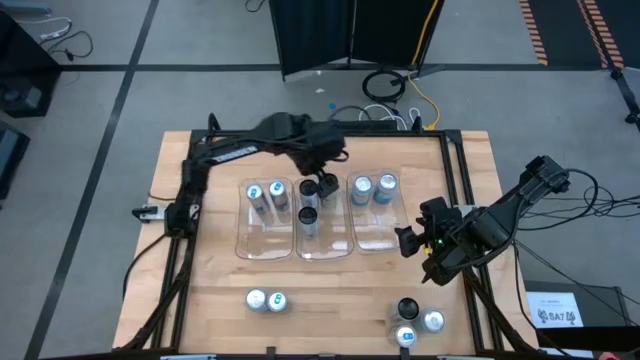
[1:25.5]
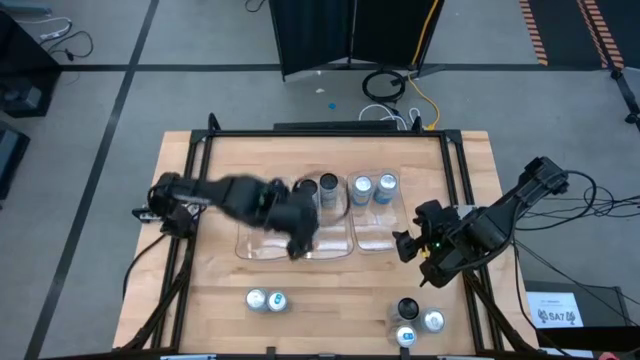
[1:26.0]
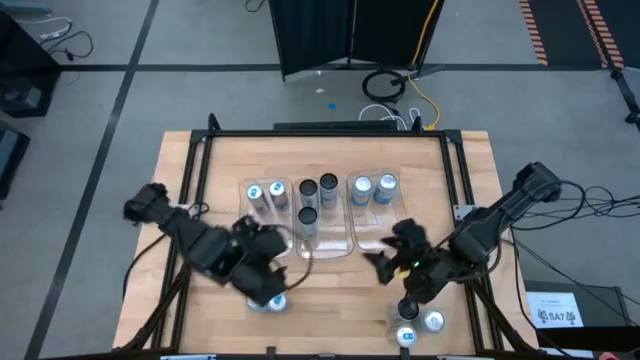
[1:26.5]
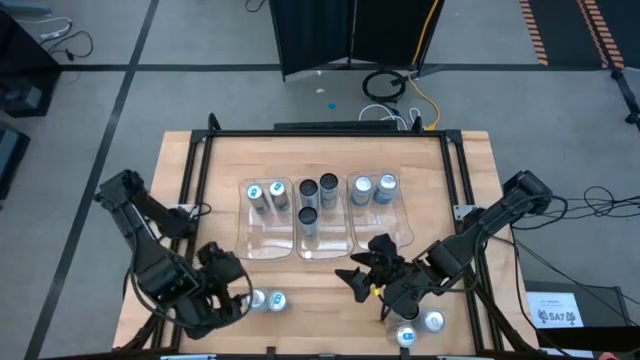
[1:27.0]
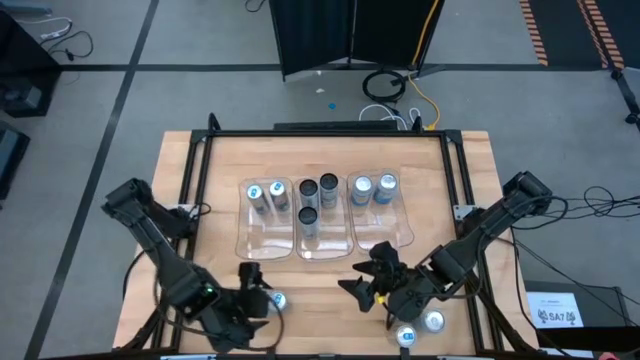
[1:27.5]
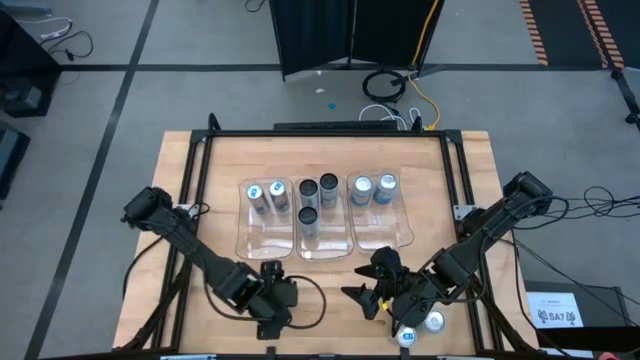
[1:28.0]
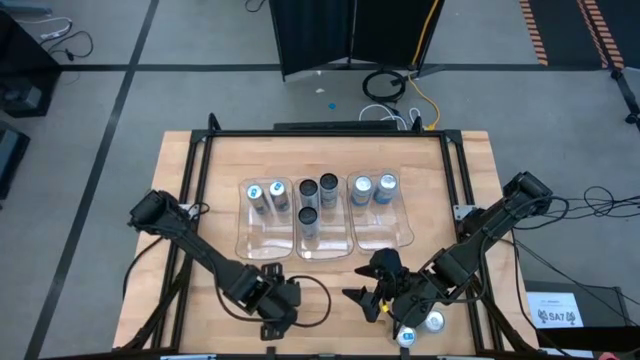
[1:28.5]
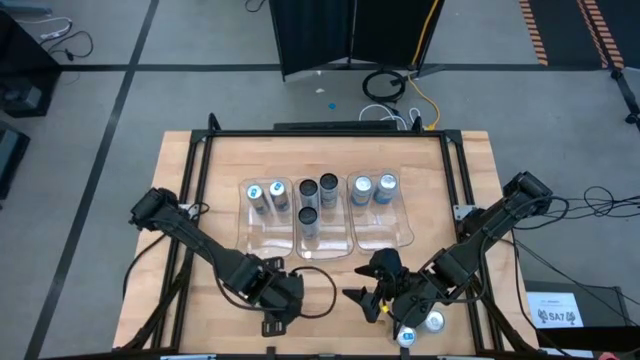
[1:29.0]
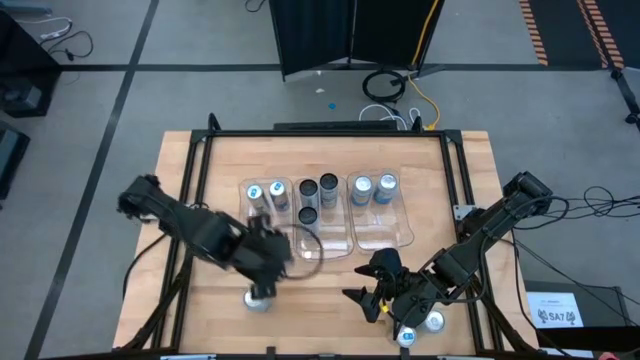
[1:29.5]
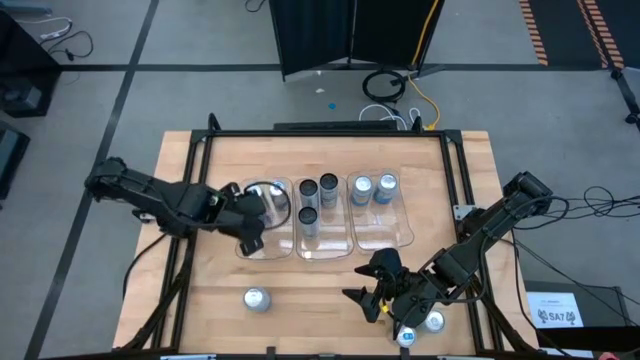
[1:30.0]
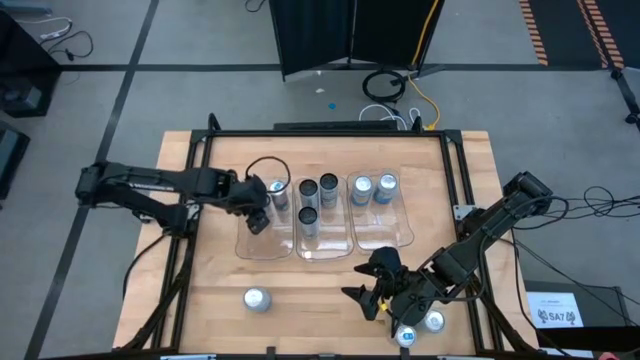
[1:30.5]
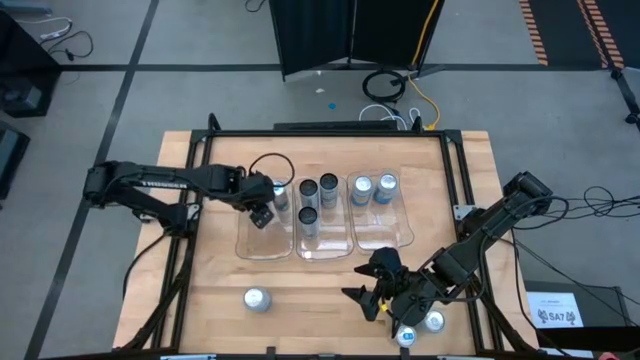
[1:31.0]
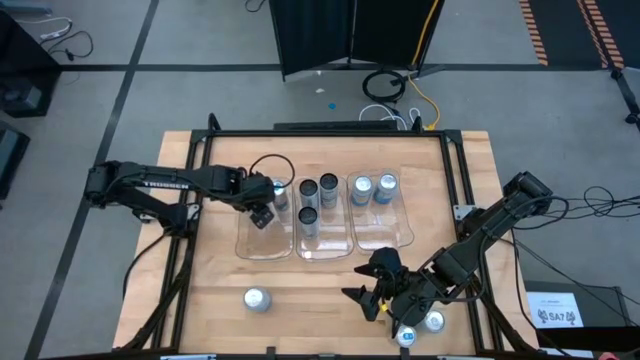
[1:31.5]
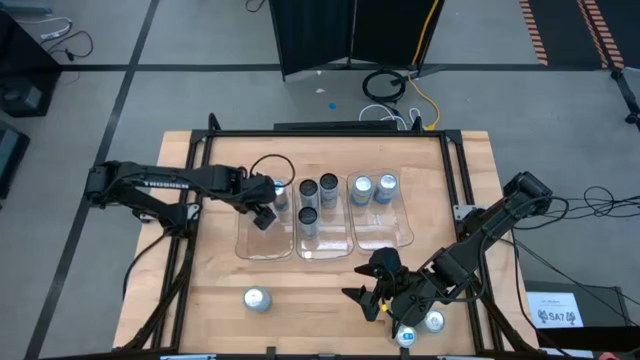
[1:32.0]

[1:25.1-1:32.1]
Task: Sort soda cans
Put the left blue soda can into the left transparent bin

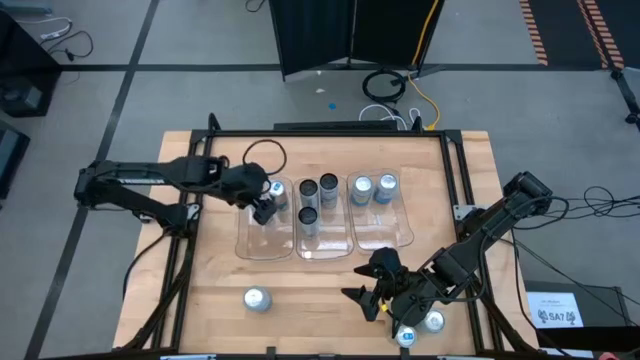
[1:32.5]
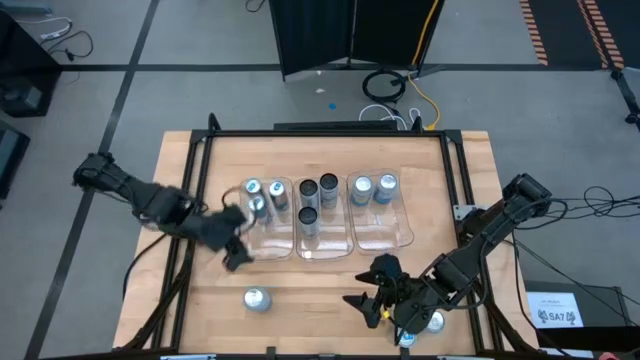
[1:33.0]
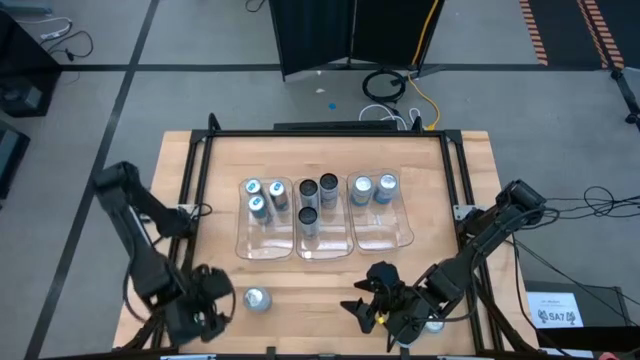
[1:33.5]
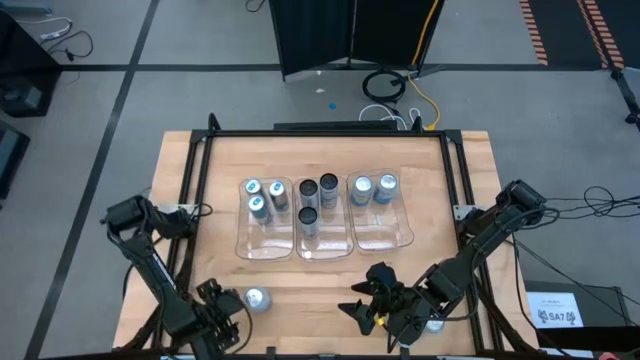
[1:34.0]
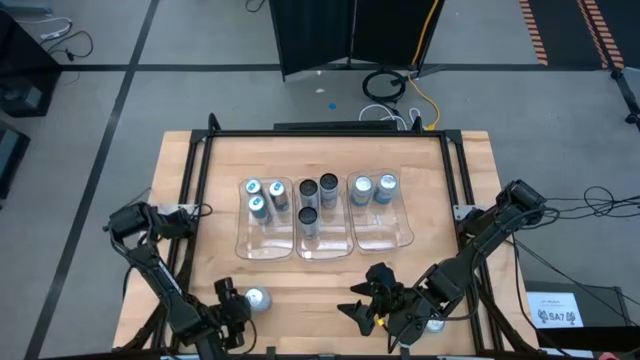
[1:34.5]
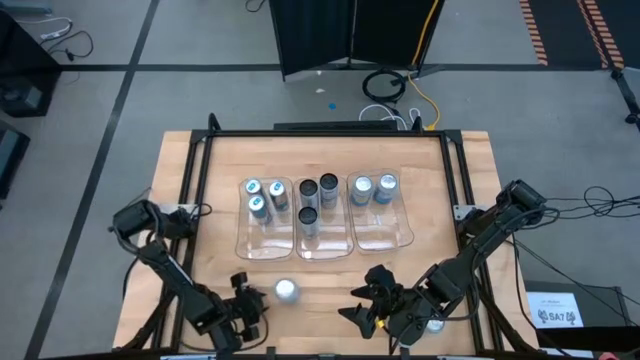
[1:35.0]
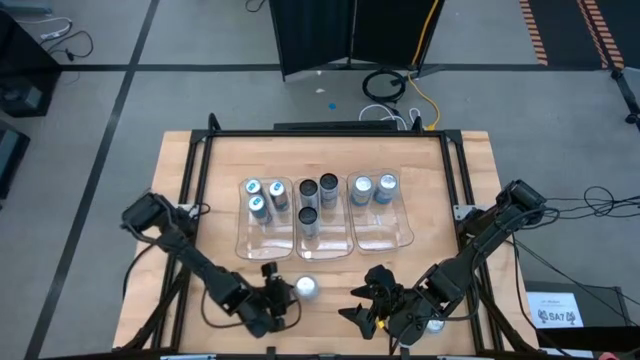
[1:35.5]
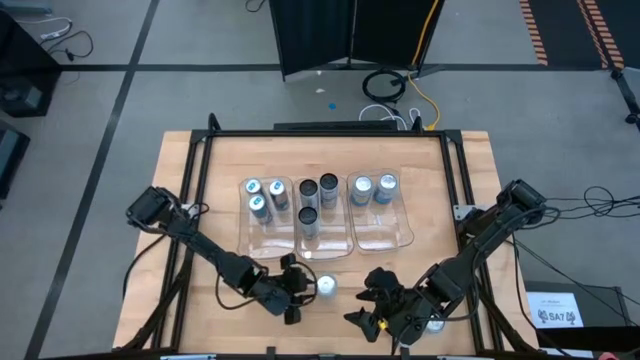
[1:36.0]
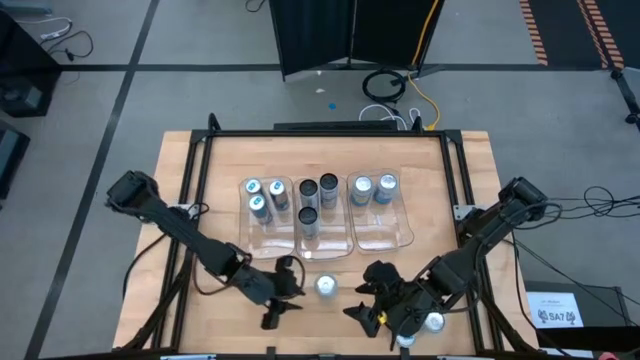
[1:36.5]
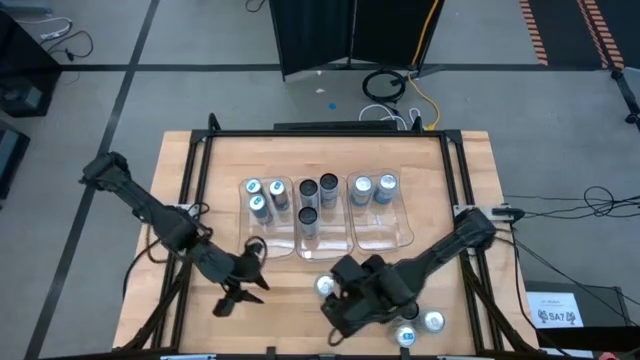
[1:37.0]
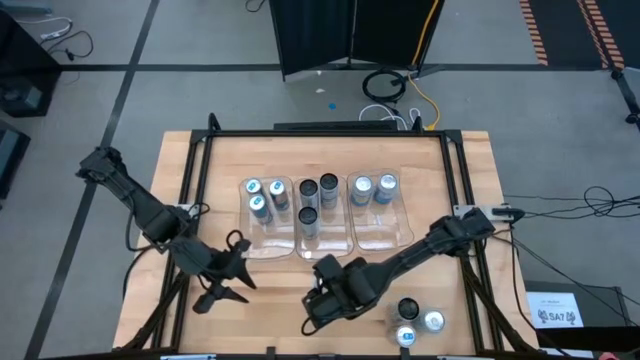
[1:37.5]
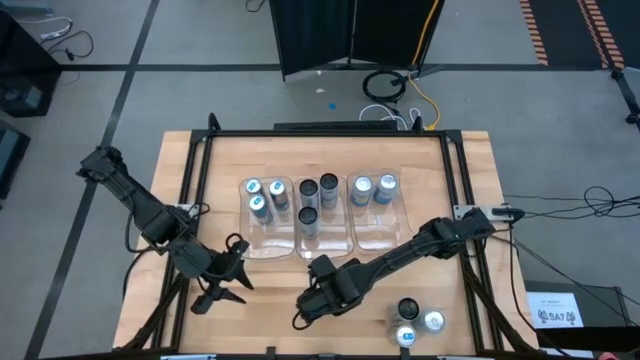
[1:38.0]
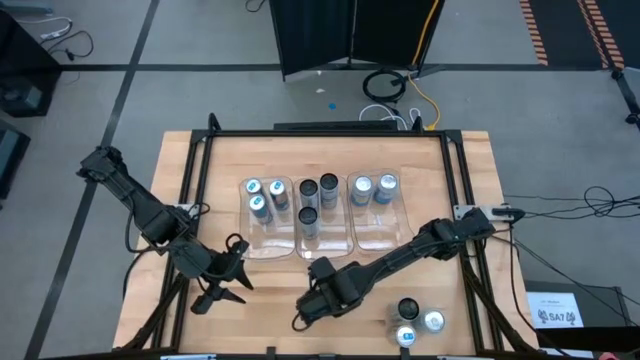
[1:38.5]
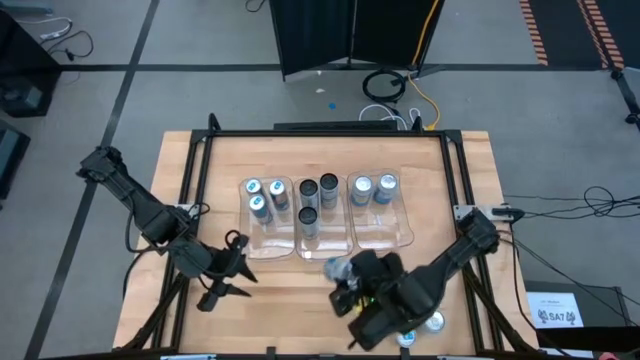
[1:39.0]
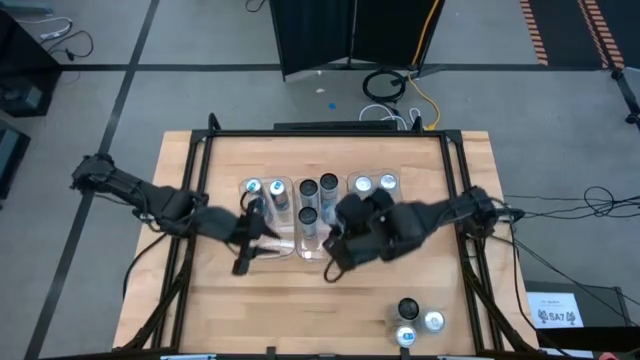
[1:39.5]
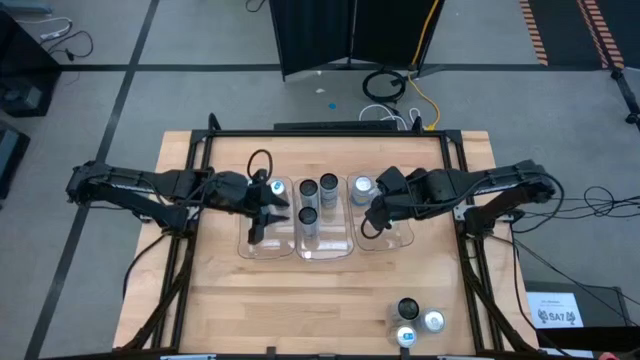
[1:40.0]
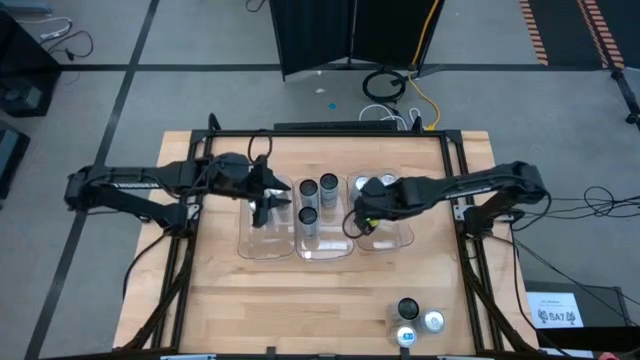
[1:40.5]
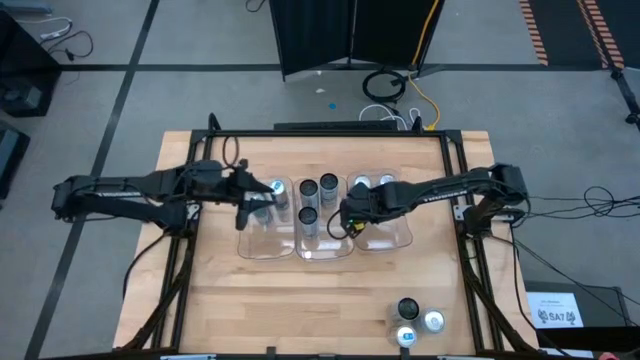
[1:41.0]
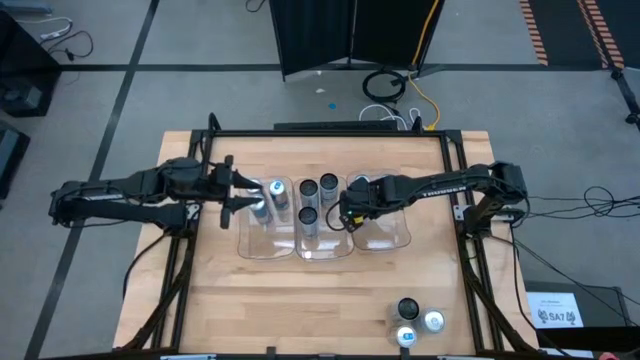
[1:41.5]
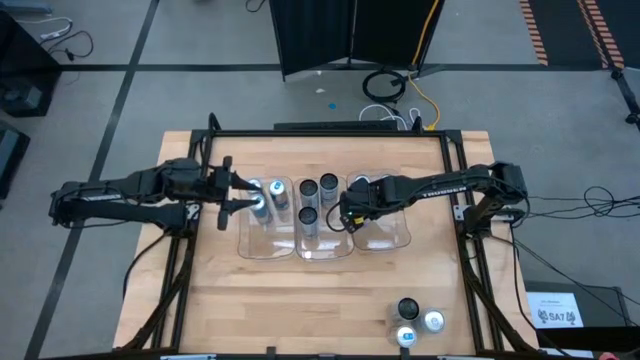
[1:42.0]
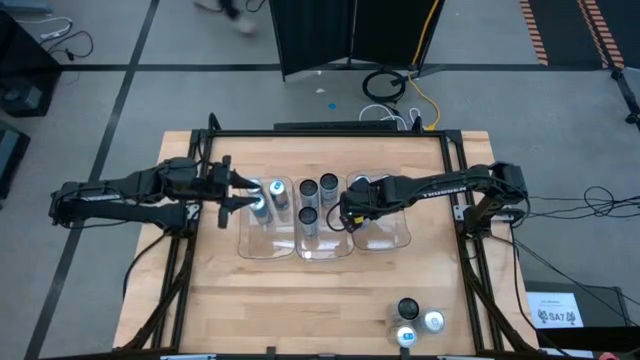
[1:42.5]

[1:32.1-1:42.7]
Put the left blue-white soda can into the right transparent bin

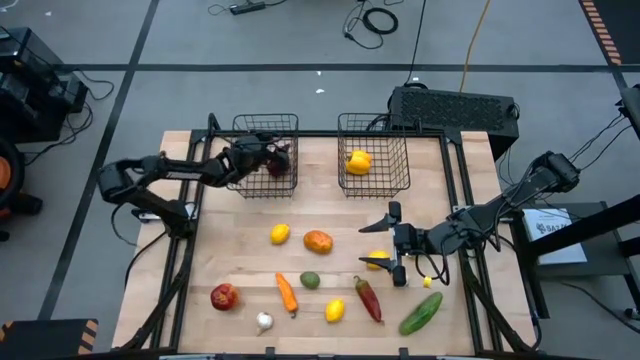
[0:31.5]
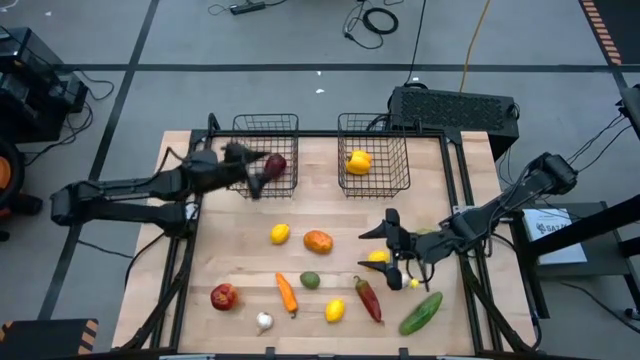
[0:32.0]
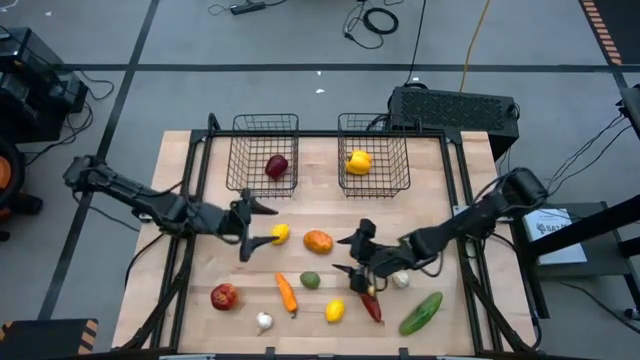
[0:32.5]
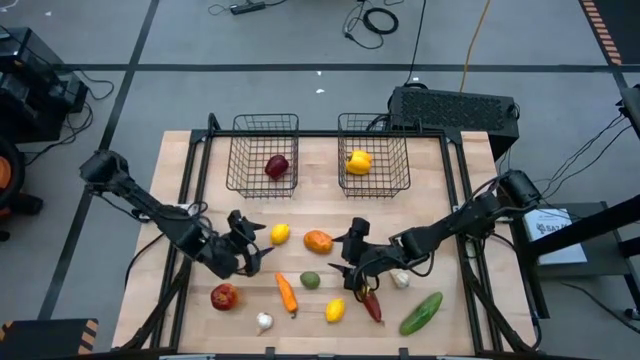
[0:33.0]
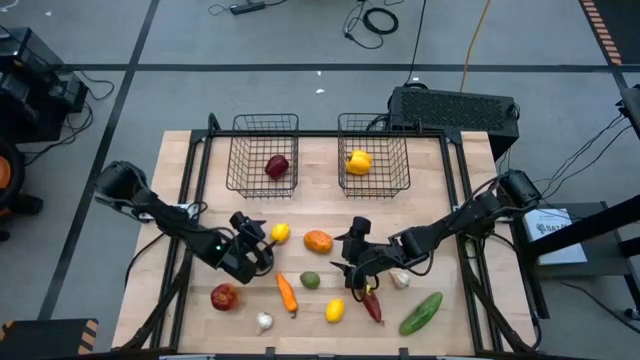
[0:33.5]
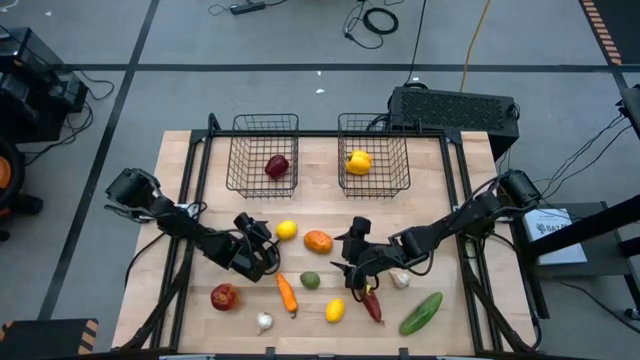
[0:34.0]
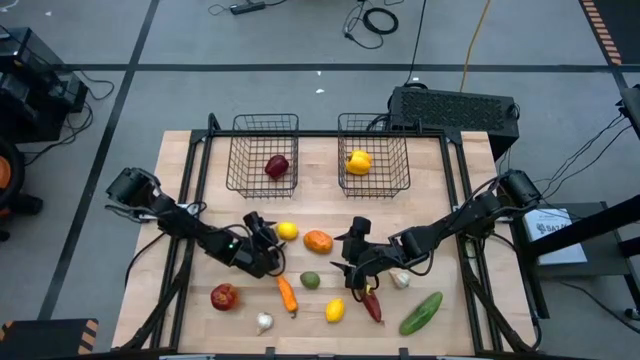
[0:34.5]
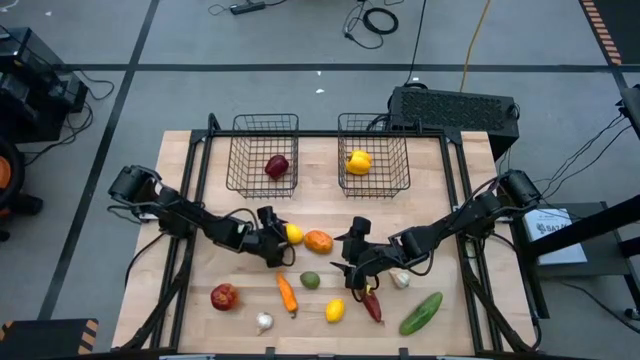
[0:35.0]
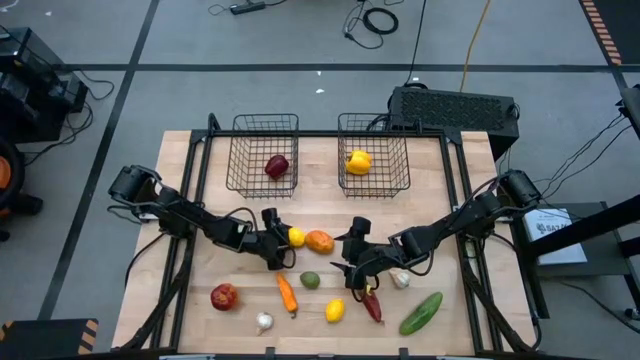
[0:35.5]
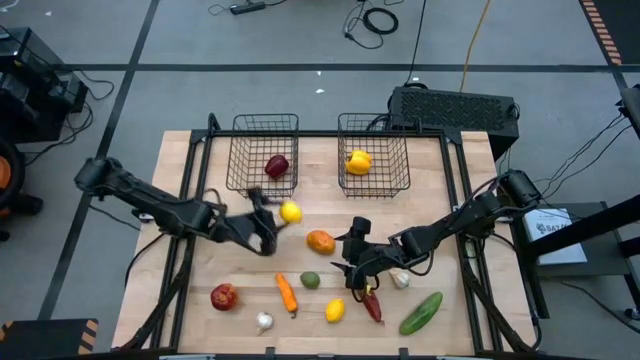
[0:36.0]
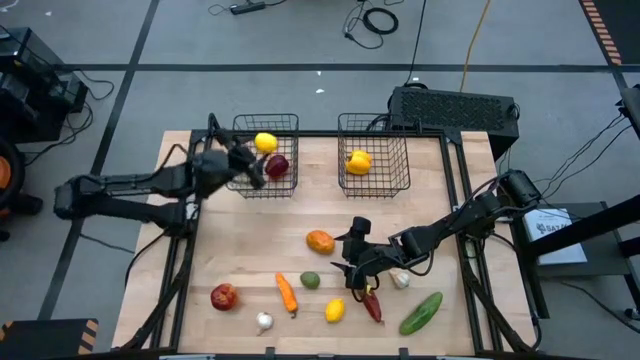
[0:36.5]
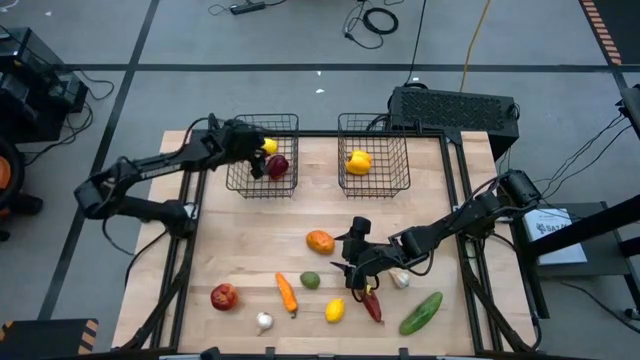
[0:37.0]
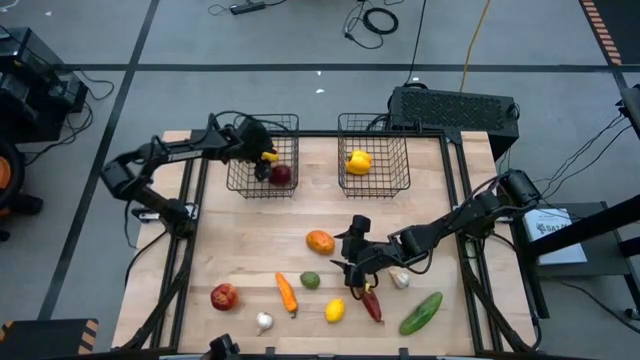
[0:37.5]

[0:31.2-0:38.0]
Task: Sort produce into baskets
Put the top left yellow lemon into the left mesh basket
